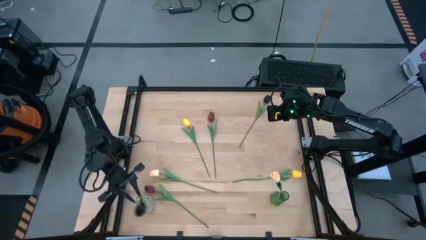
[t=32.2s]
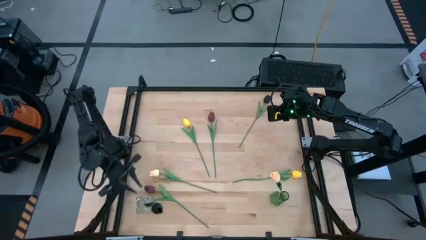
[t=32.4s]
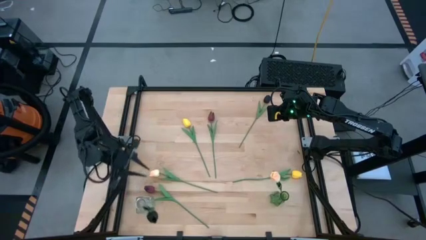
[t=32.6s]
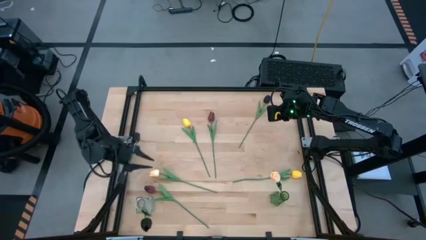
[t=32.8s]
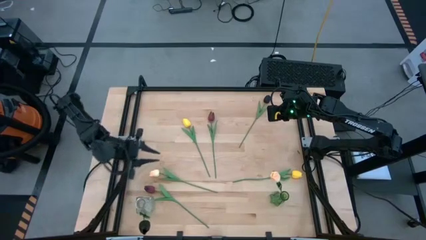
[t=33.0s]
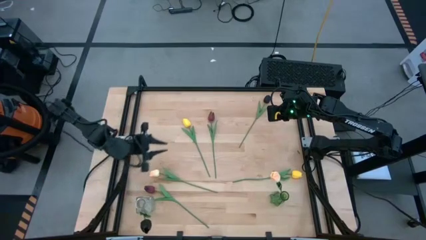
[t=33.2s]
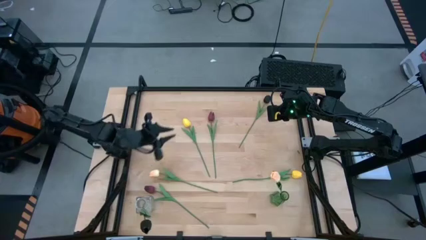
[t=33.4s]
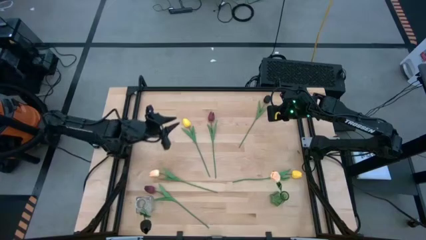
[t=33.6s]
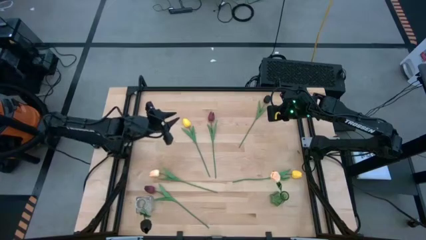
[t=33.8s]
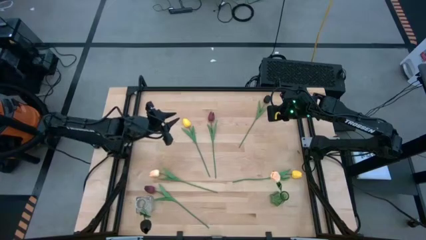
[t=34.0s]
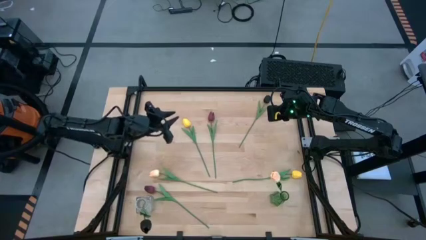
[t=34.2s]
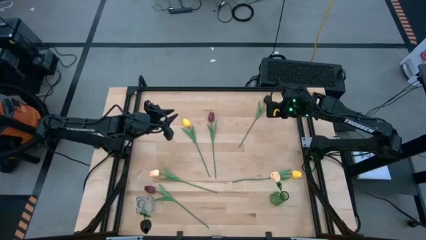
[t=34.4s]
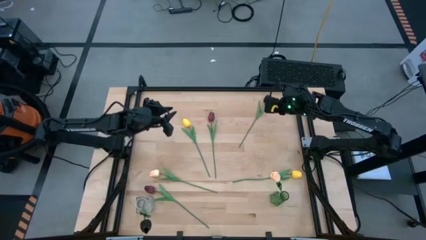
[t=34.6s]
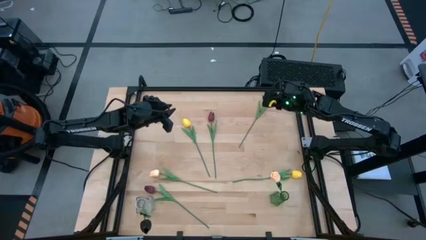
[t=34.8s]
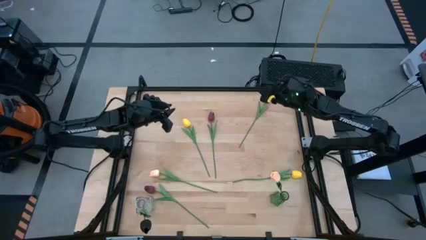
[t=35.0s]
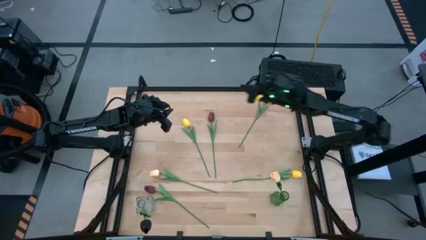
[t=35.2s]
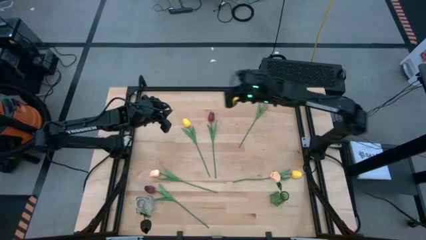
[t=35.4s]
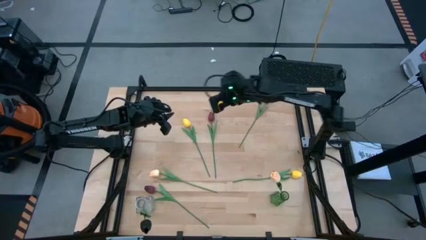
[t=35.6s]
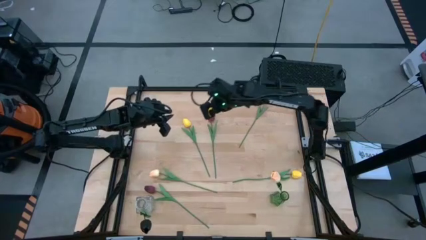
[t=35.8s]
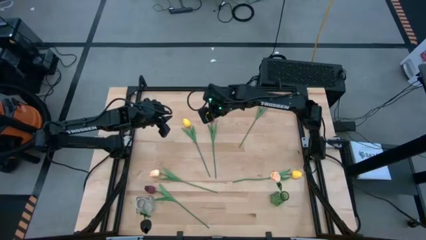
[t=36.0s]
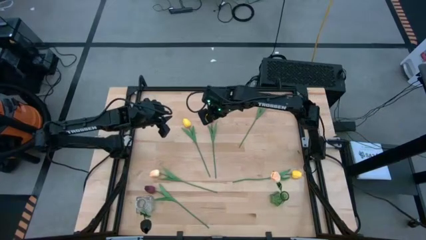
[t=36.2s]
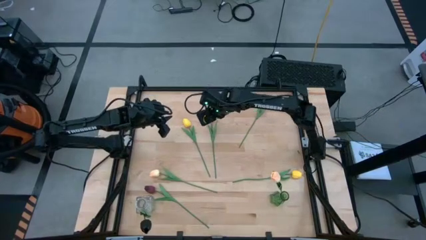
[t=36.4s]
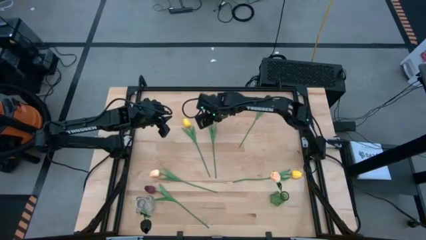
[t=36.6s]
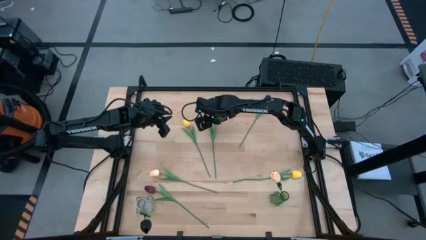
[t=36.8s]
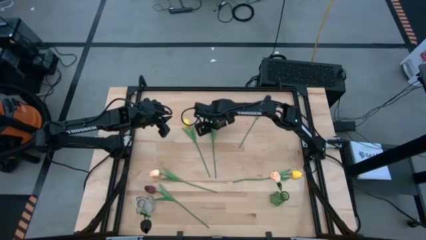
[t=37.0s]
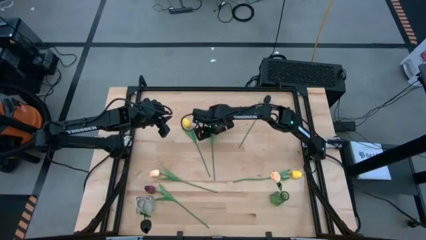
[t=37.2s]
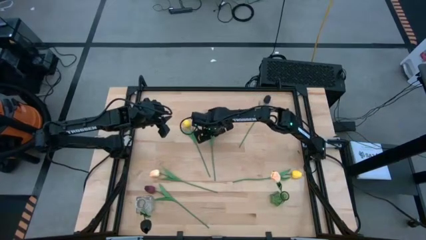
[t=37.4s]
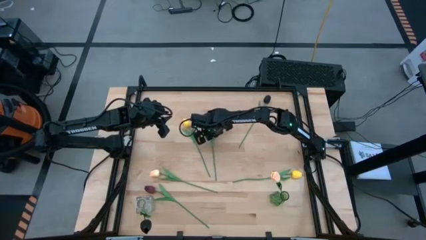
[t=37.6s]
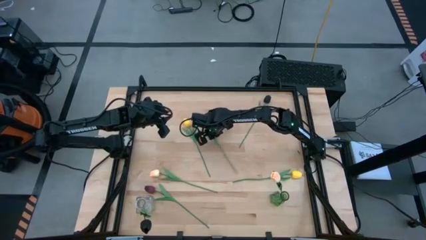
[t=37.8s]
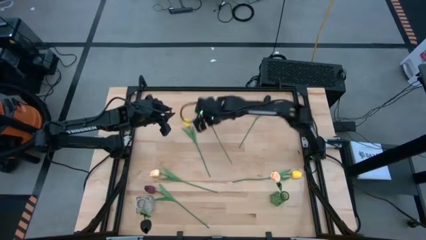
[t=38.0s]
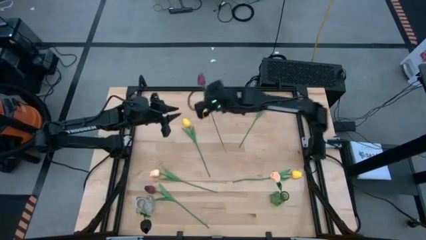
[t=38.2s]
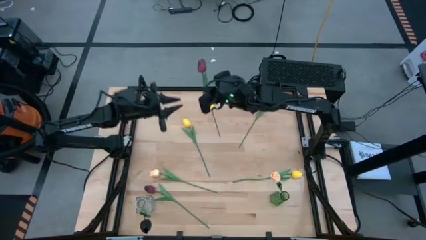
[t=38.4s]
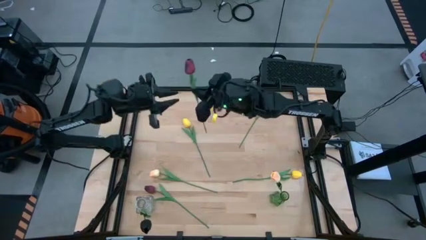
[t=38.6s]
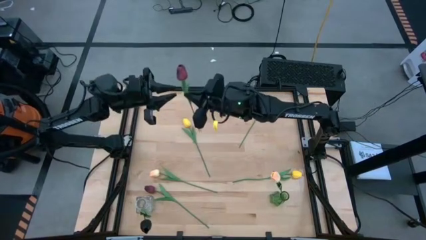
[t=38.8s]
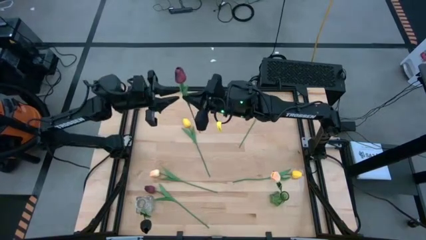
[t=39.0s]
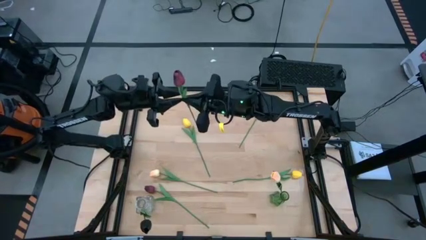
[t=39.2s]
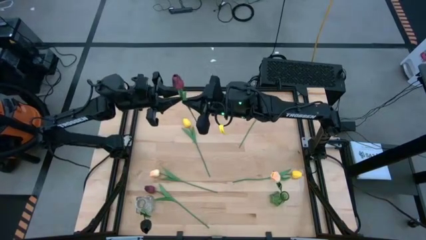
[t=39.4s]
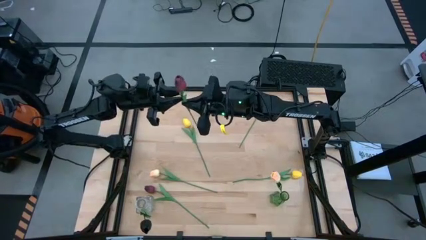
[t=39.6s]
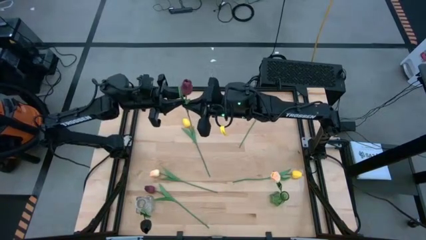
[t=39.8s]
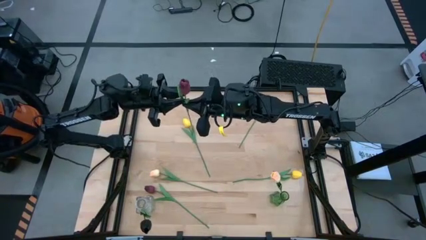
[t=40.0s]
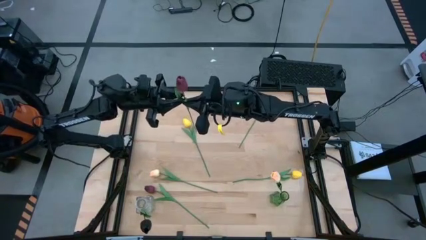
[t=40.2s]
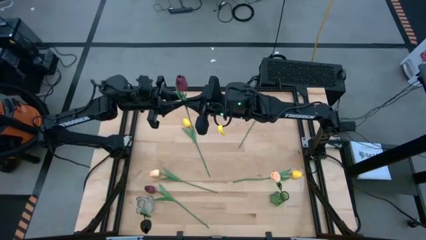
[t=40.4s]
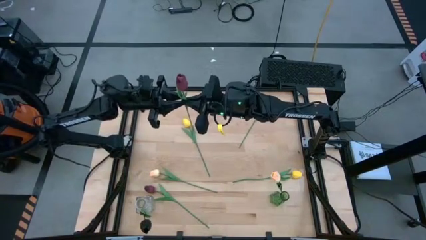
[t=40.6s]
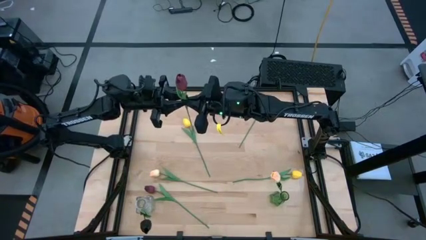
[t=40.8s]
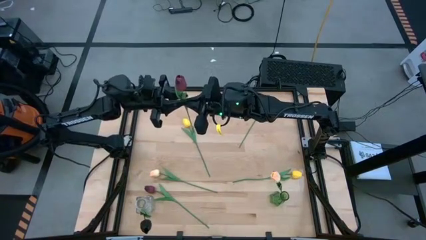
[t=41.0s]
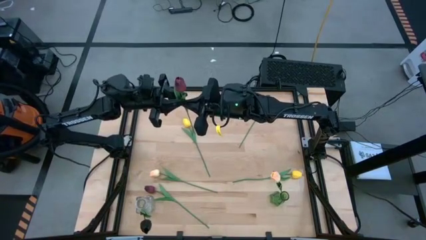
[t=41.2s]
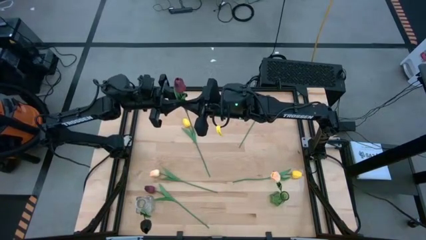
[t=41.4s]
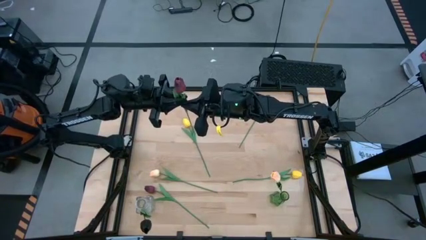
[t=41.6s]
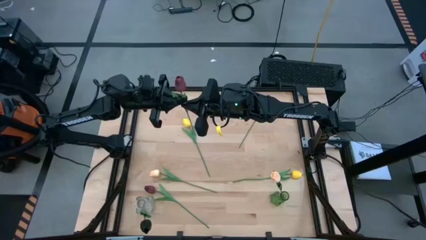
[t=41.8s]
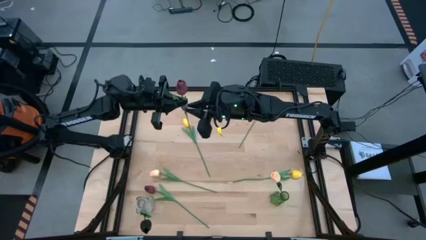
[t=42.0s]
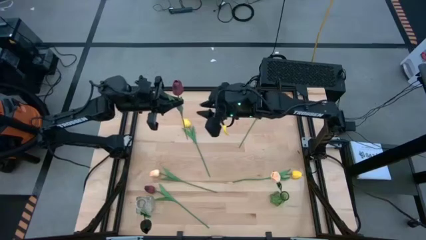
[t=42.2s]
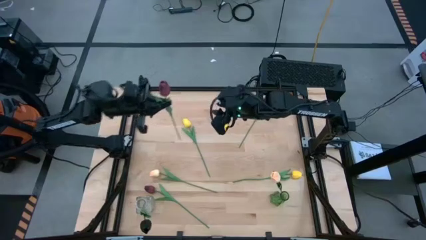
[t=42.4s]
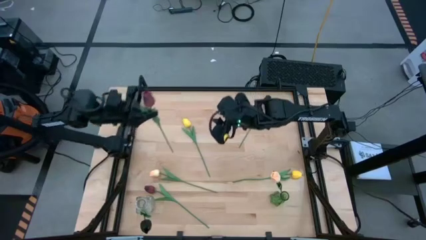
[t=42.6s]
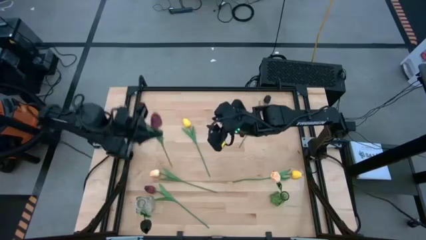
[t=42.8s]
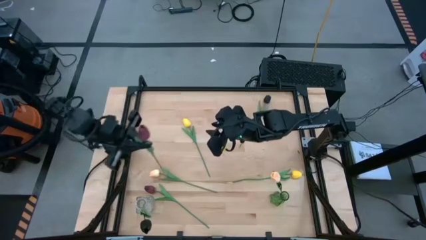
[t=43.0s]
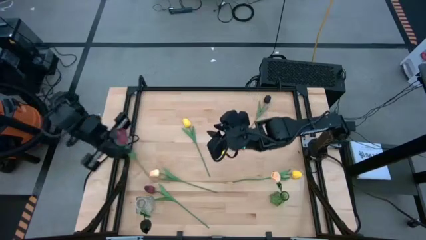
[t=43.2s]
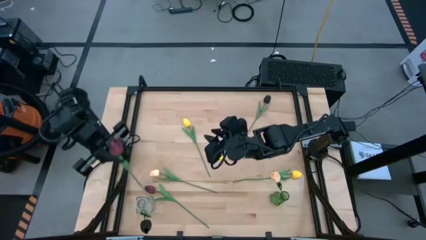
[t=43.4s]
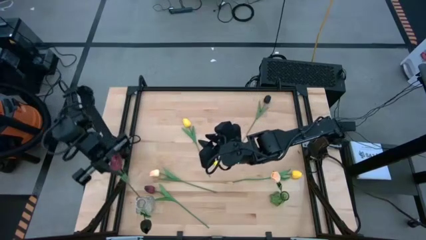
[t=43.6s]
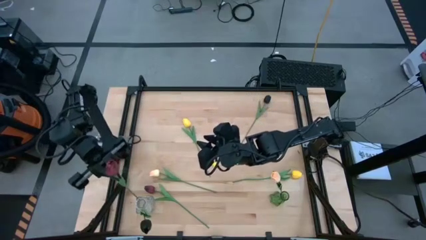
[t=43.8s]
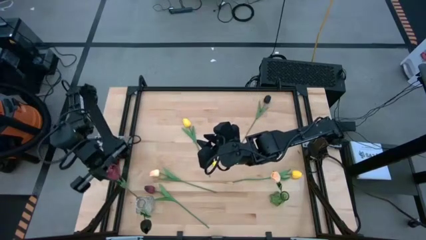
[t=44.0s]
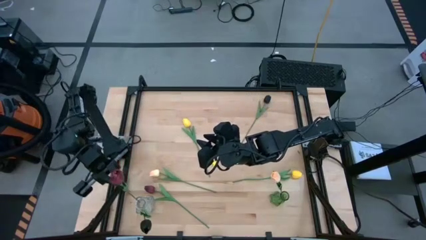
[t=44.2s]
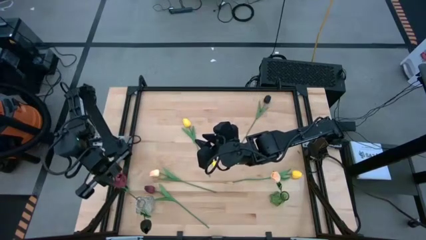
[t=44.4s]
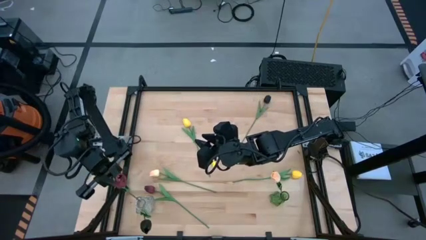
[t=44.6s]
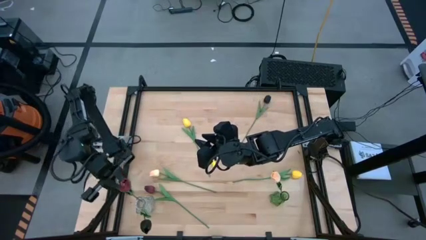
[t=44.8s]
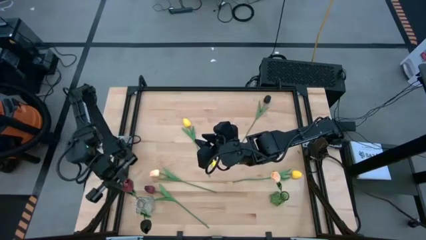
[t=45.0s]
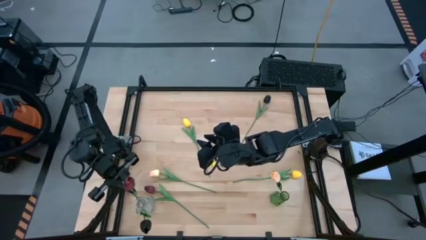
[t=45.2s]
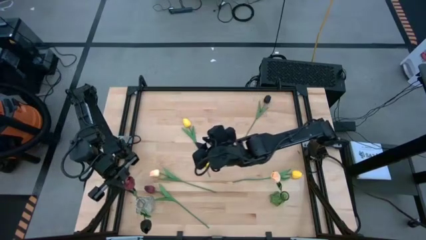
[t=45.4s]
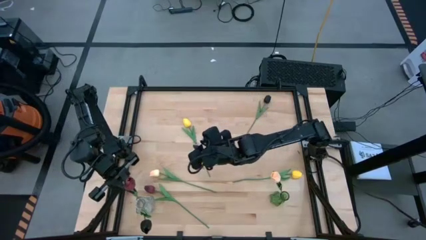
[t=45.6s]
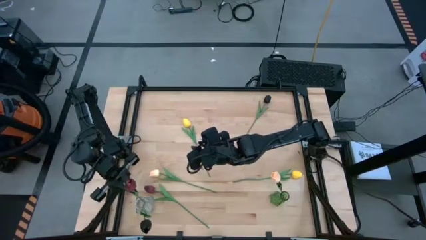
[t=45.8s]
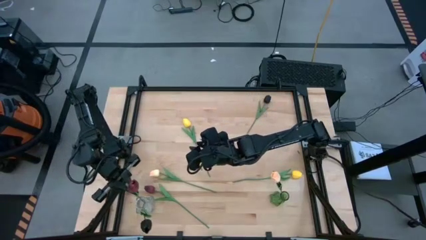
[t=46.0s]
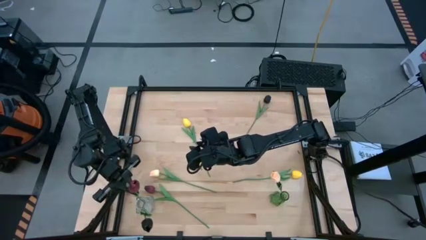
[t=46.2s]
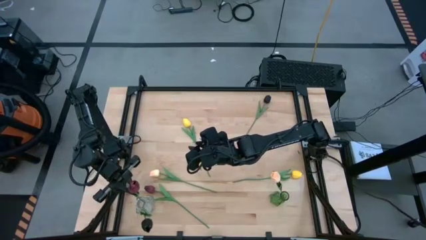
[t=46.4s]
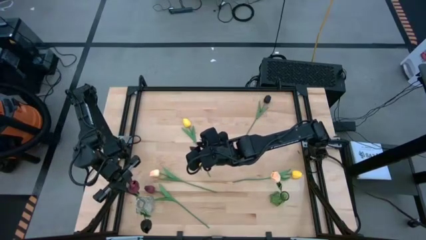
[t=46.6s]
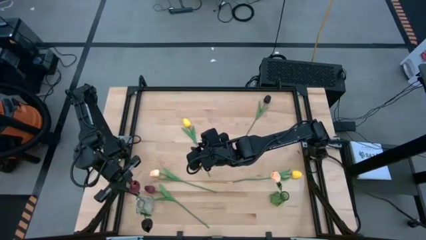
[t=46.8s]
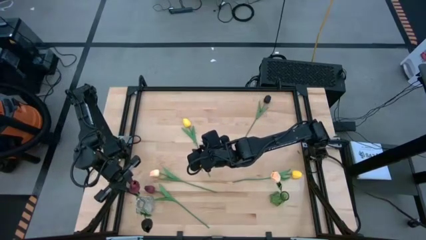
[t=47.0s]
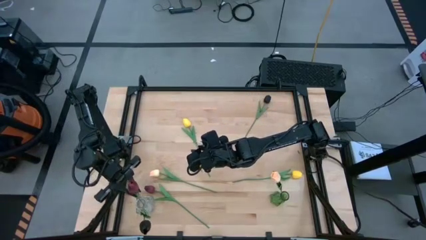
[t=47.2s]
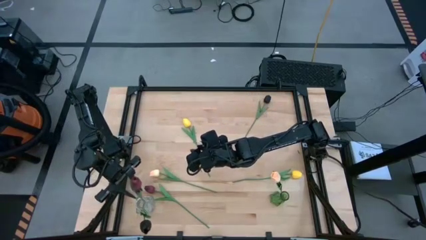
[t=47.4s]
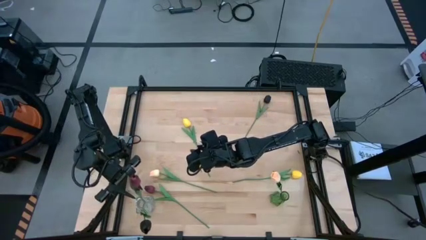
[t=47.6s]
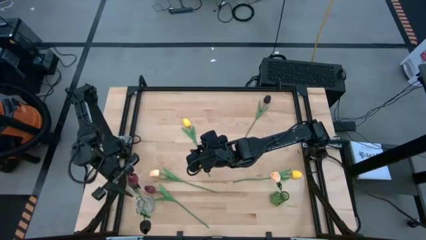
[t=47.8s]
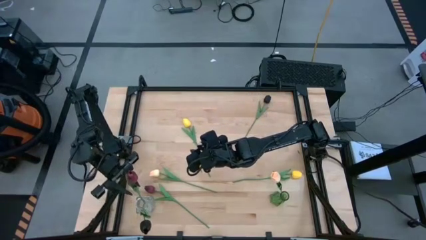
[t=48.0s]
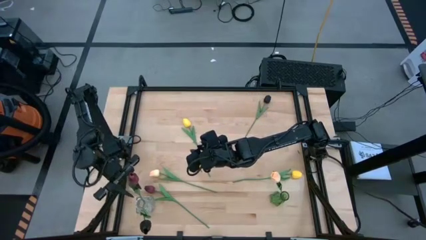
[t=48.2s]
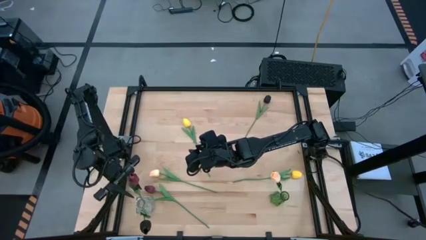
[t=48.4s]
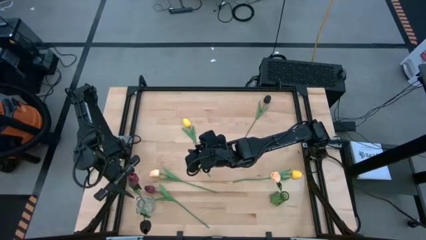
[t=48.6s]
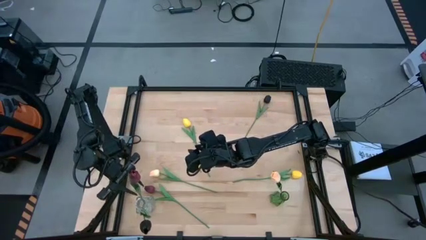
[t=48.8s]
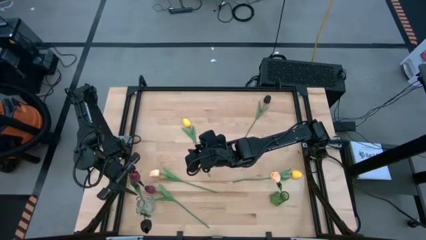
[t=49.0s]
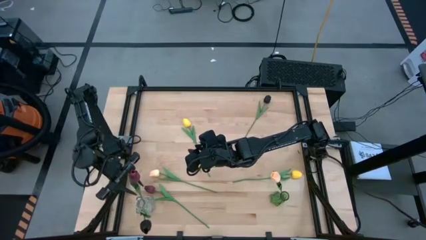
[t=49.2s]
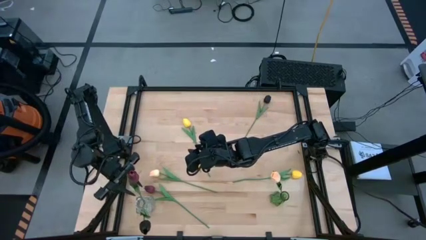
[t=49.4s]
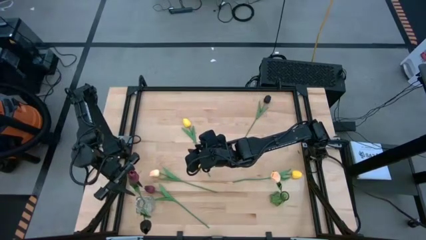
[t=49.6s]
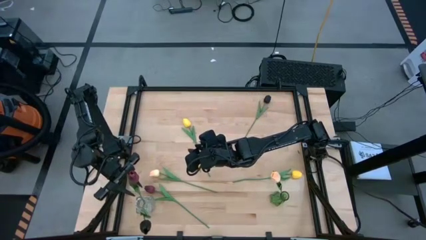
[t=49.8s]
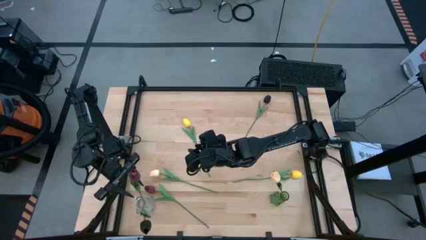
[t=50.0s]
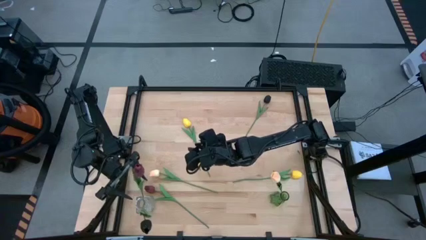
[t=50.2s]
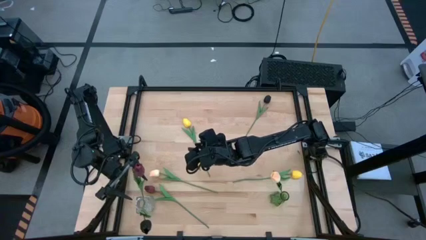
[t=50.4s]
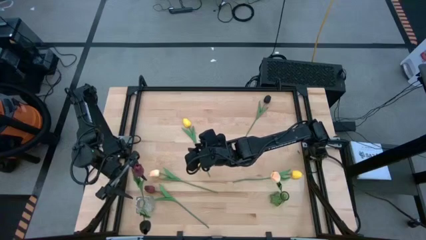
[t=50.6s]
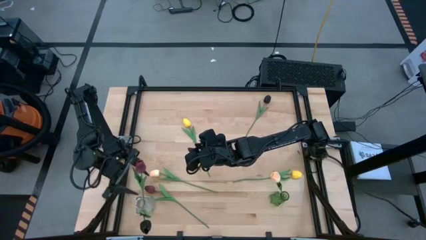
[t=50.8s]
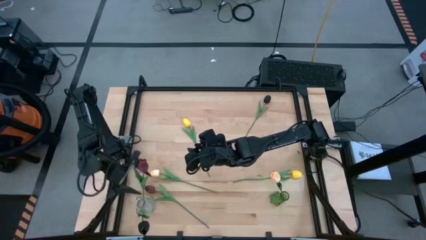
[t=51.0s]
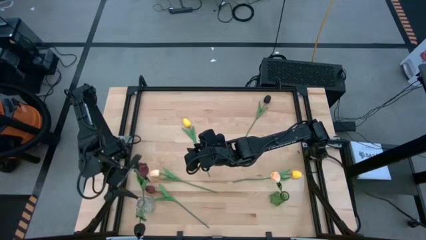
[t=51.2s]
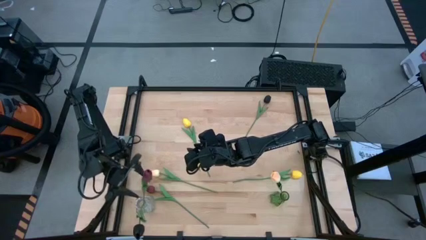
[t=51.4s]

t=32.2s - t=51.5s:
Task: Sort flowers into vase by color
Put the top red tulip into the transparent vase
